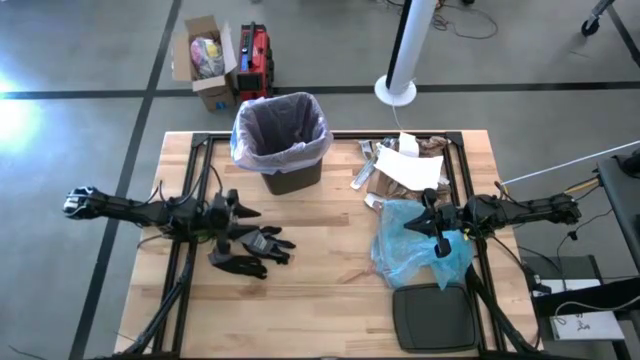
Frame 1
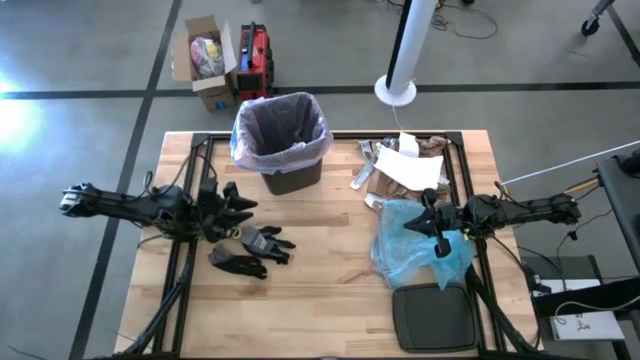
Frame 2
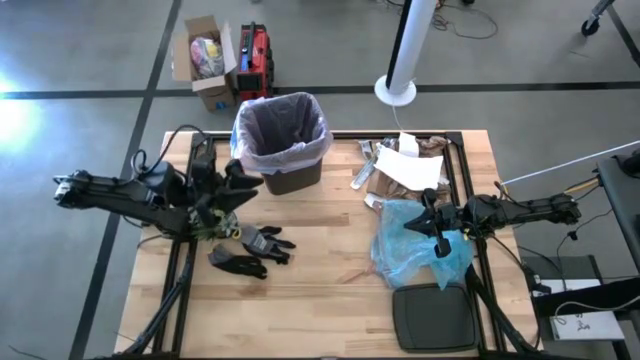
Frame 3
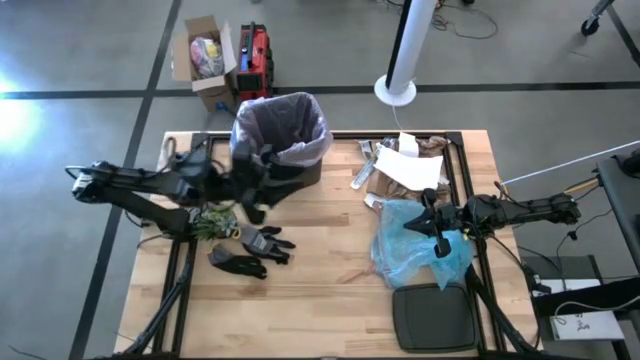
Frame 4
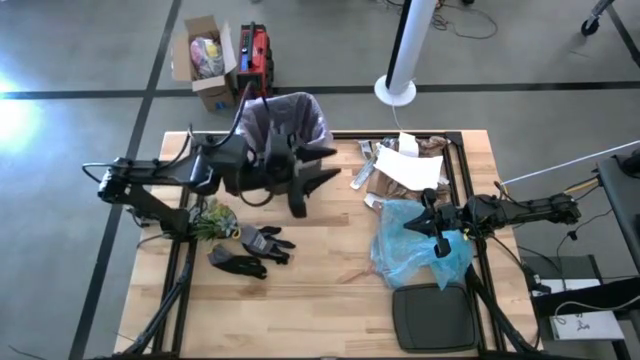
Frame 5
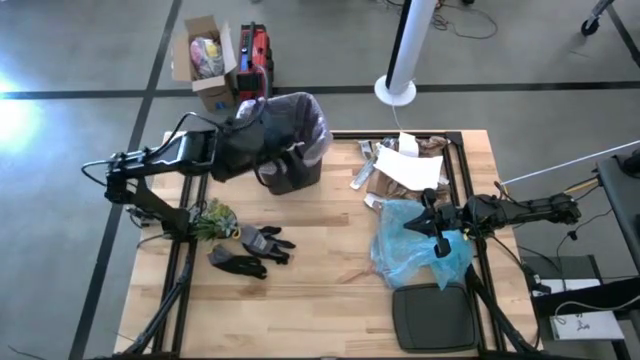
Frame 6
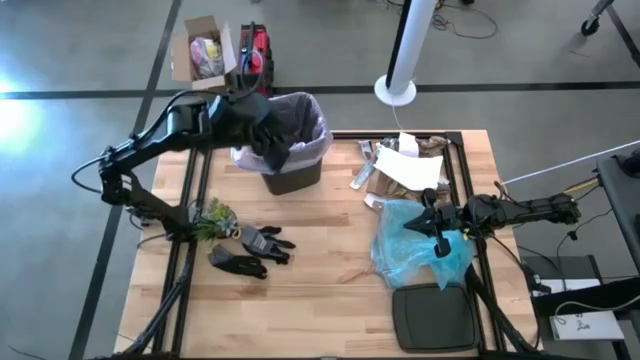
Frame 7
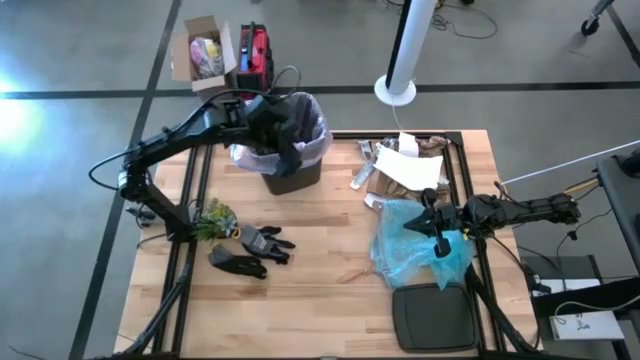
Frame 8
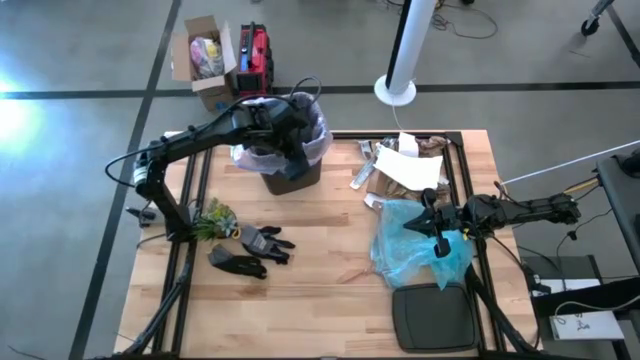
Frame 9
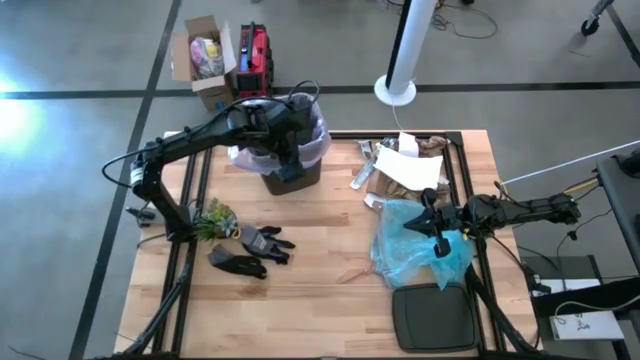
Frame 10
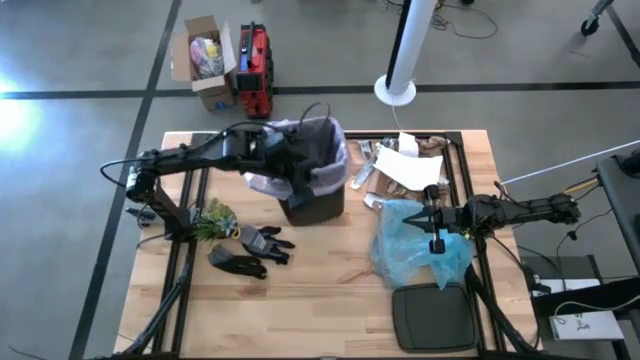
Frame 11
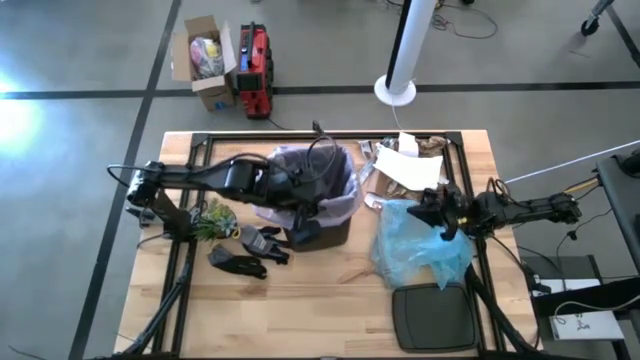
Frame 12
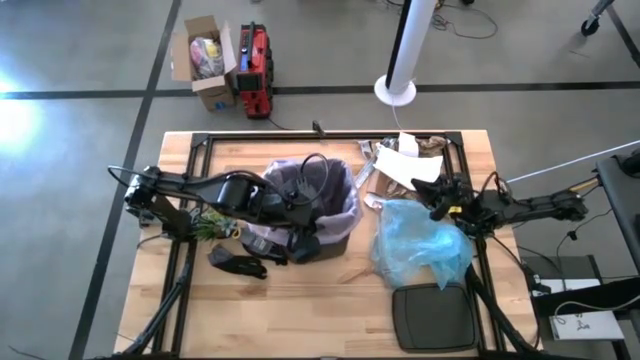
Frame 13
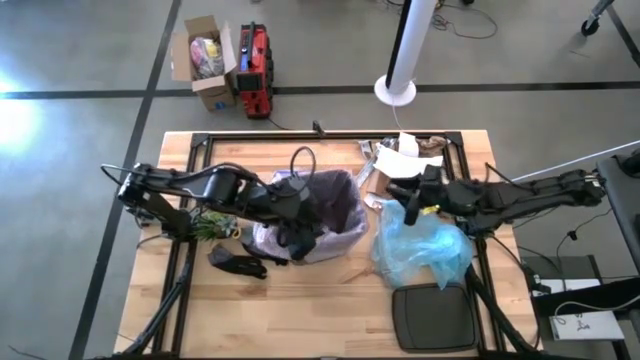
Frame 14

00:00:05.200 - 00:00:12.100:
Task: place trash/remove bag and relplace
Move the trash bin to the center of the table

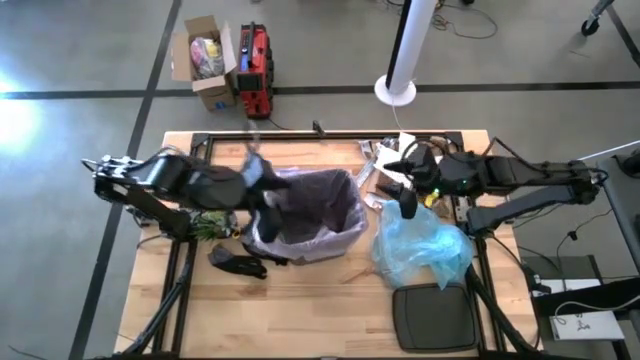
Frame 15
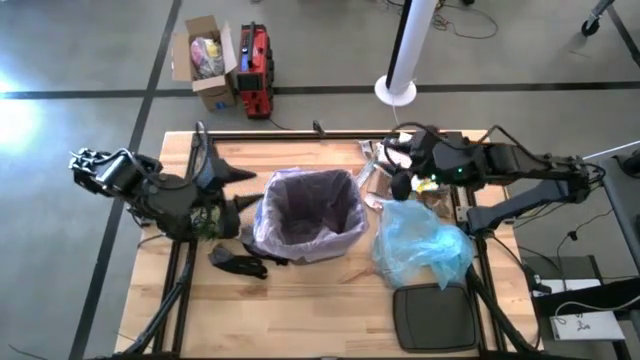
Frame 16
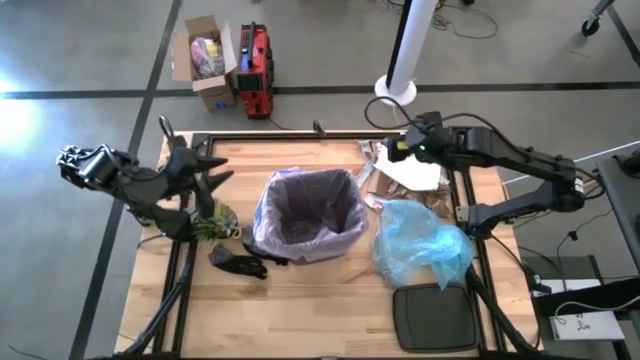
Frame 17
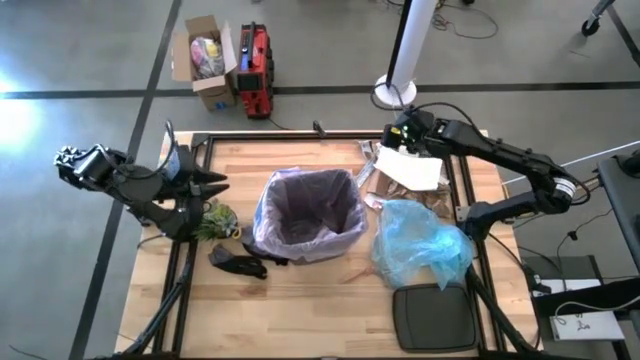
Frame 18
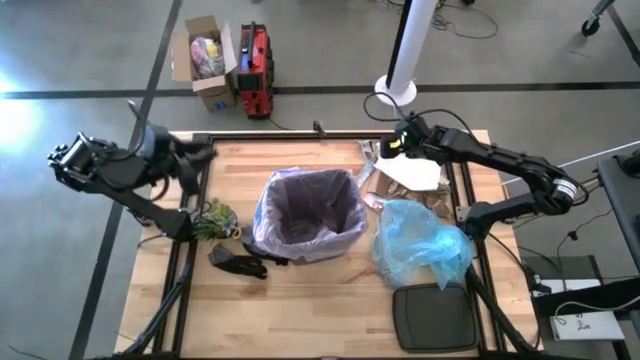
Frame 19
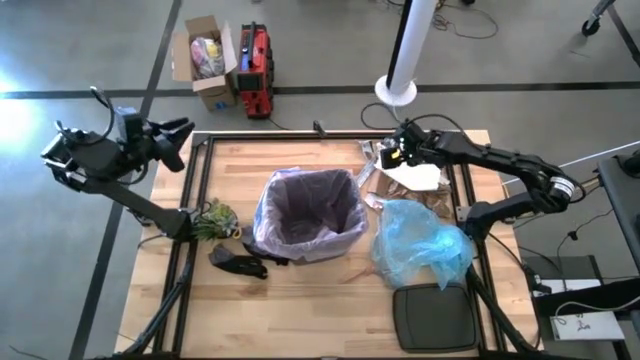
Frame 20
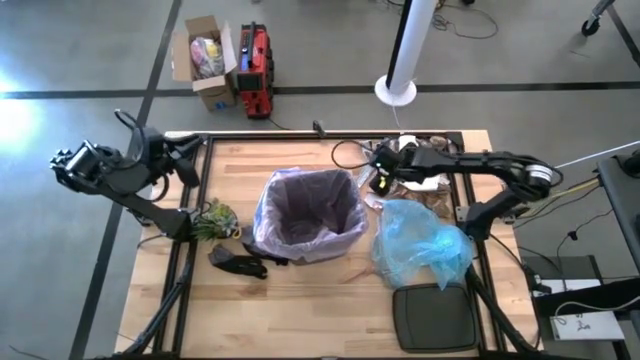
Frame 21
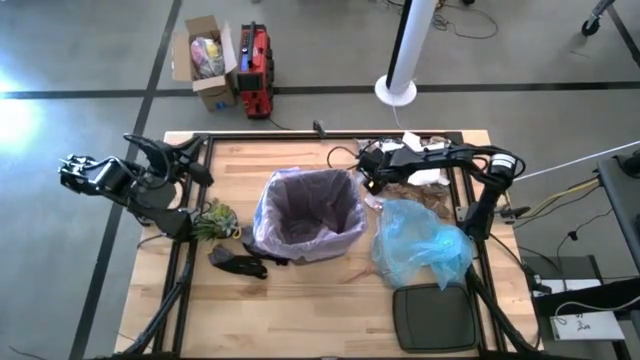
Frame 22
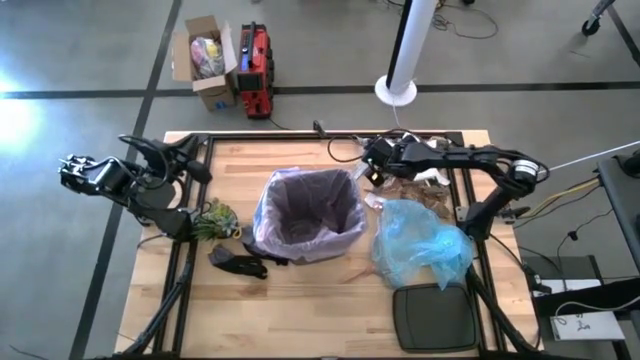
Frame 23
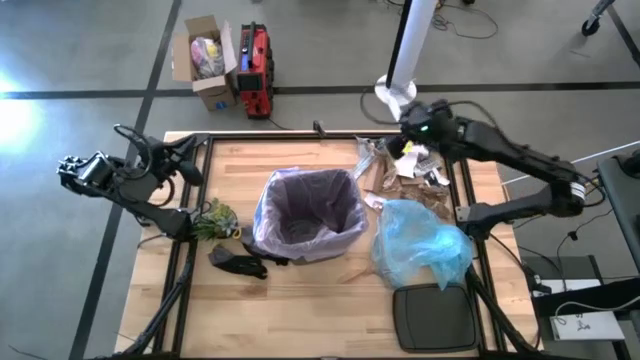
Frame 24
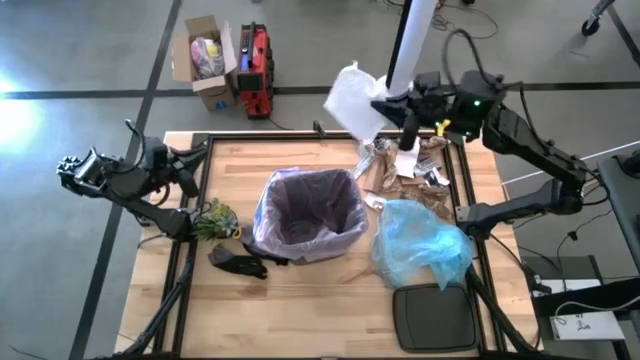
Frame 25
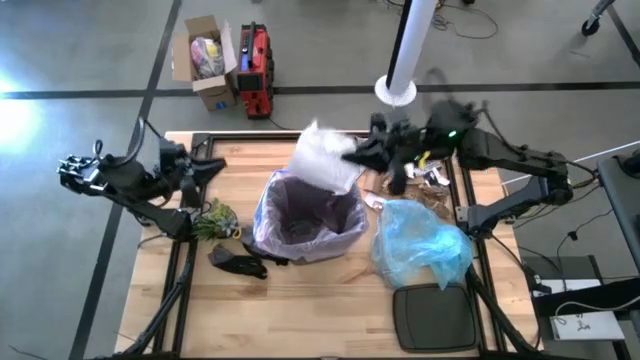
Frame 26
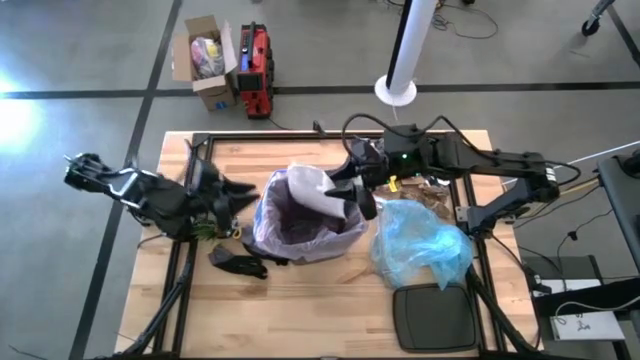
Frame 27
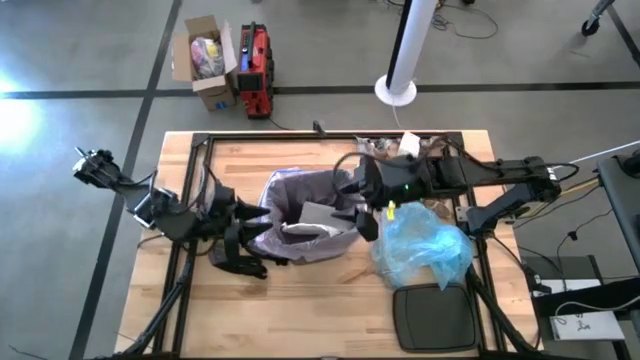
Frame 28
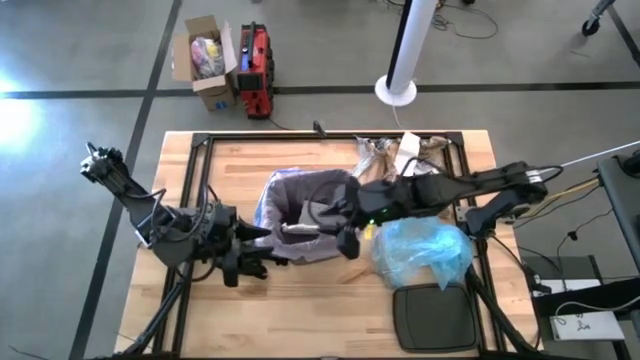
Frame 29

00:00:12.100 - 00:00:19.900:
Put the white bubble wrap into the trash bin

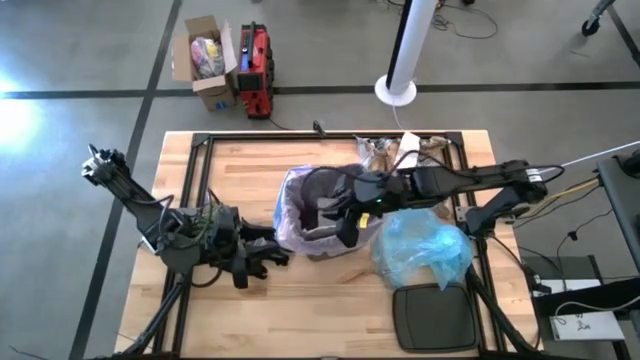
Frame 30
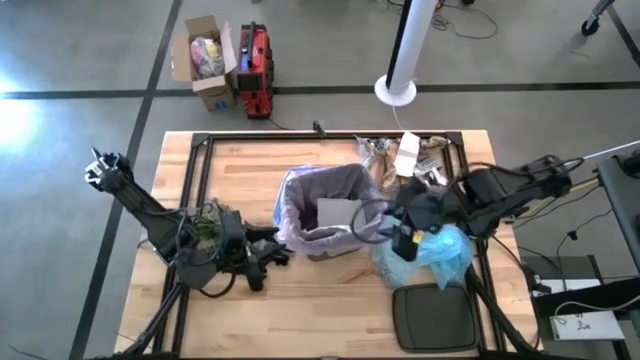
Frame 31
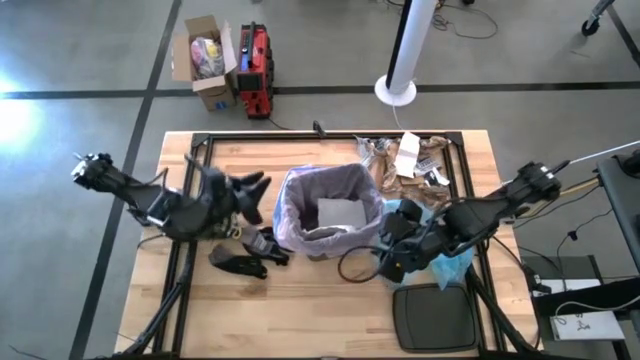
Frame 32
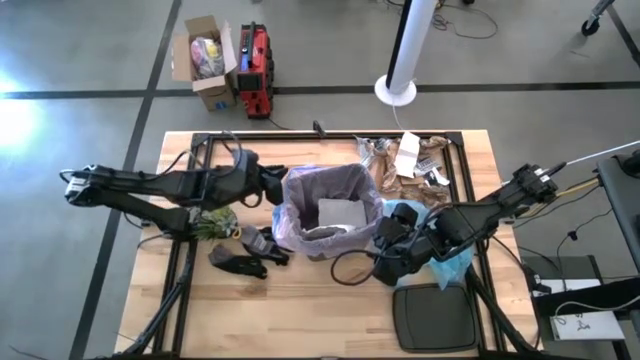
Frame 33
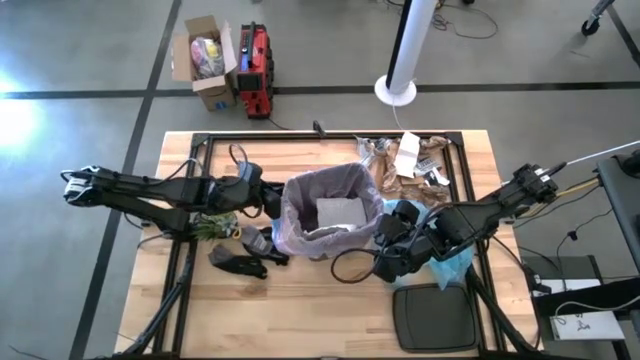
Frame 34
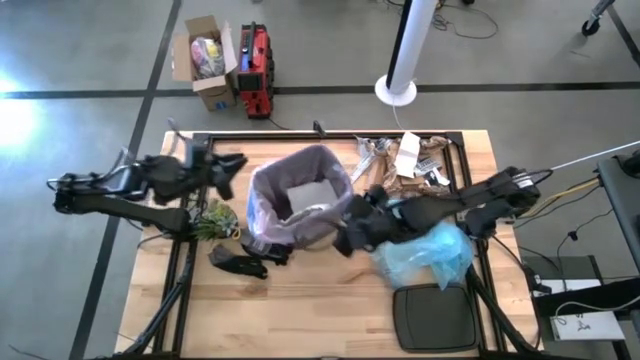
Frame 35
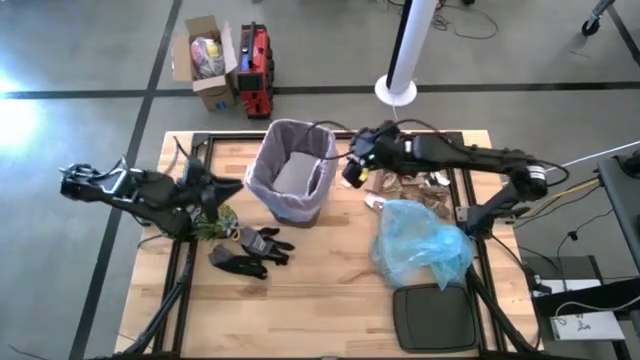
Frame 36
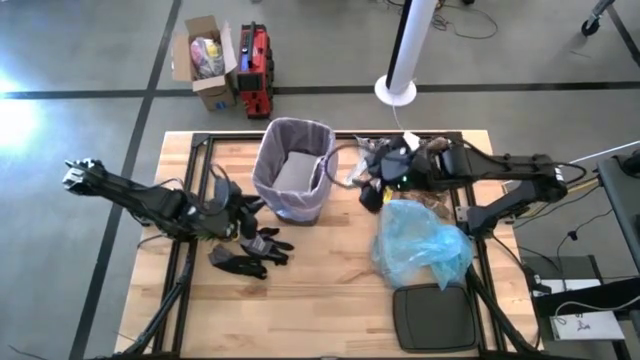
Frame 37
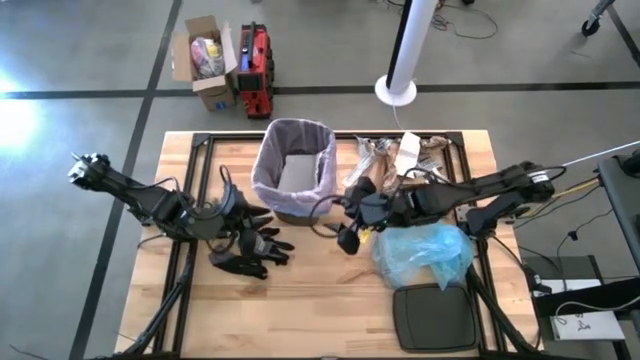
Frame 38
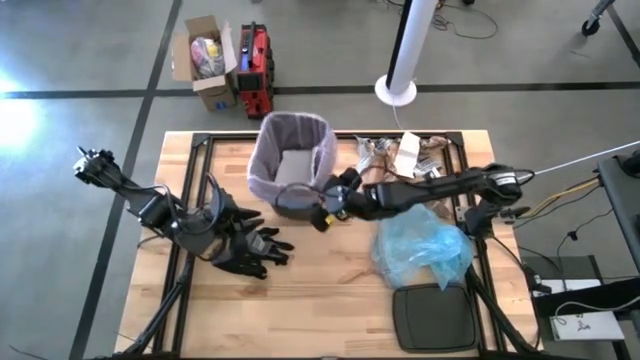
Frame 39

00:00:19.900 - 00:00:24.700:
Move the trash bin to the top center of the table

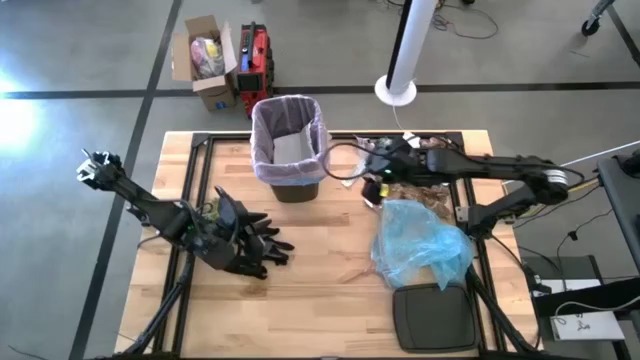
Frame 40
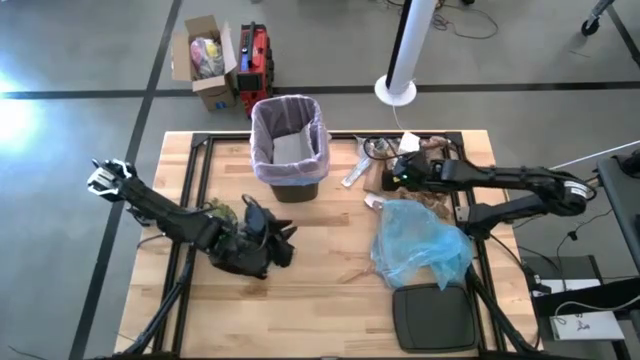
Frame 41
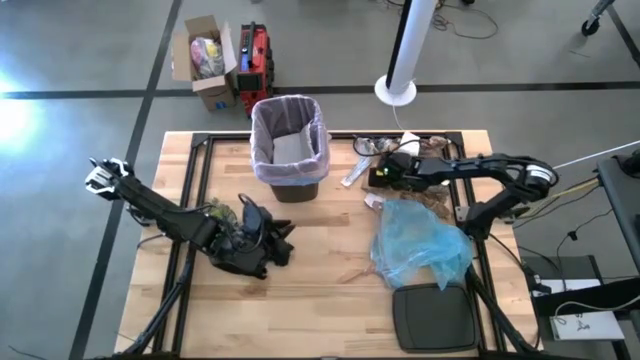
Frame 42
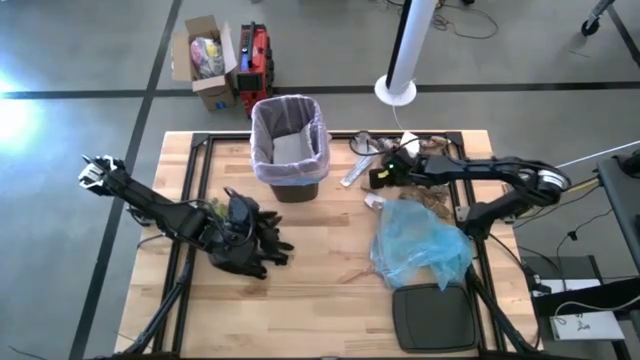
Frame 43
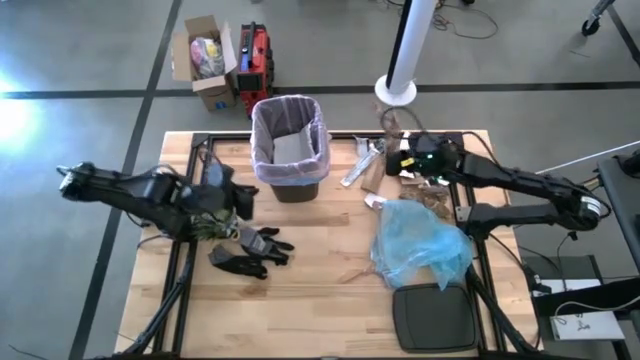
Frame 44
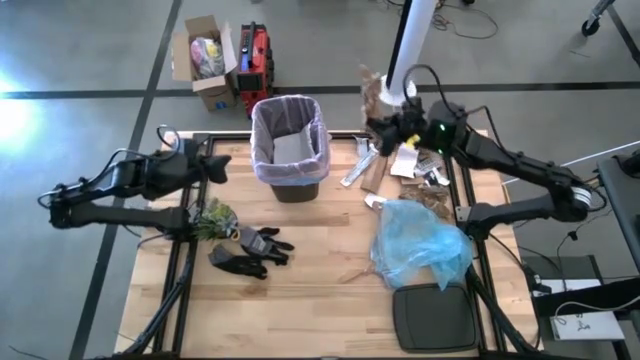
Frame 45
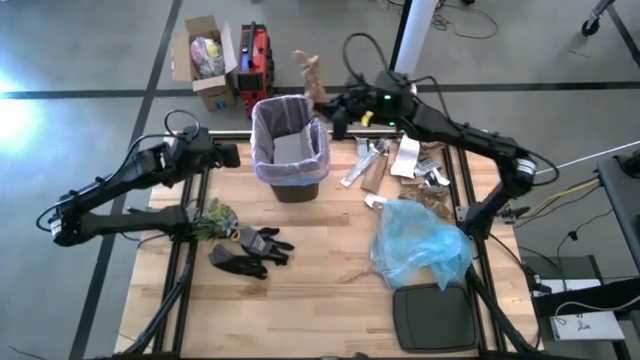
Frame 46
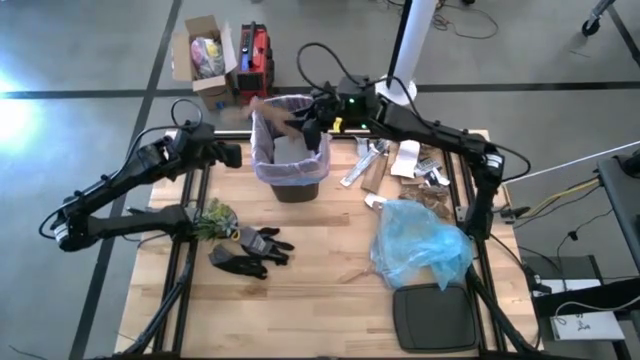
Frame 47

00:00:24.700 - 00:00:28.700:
Put the brown napkin into the trash bin
